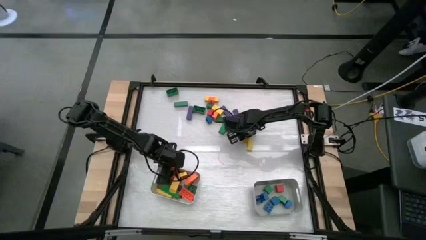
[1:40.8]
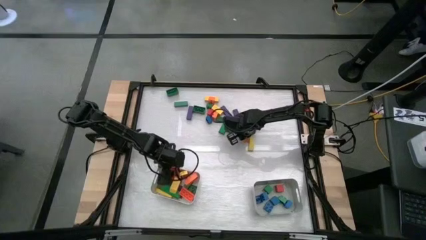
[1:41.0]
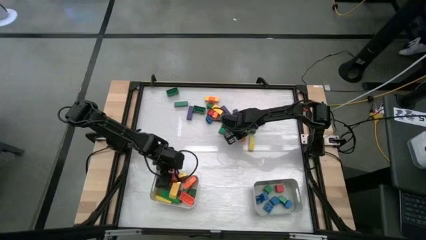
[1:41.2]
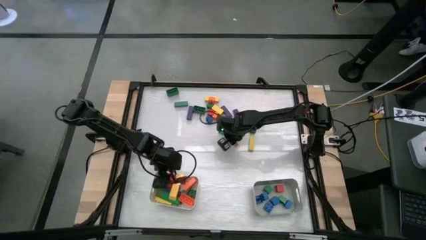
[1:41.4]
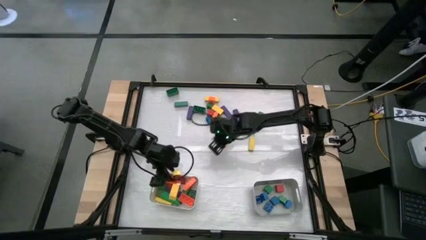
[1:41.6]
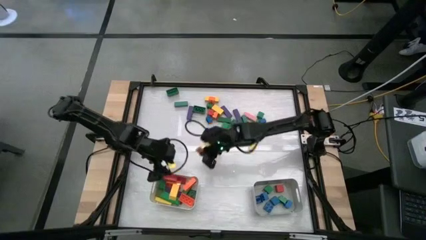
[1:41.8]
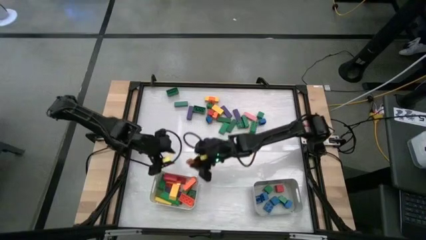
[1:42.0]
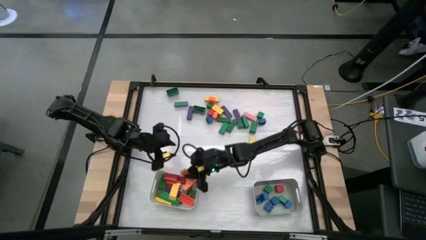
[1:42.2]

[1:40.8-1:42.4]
Task: Sort blocks by size
Put the rectangular orange block into the white bin

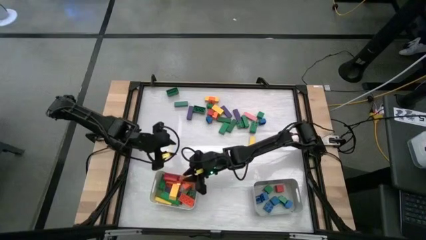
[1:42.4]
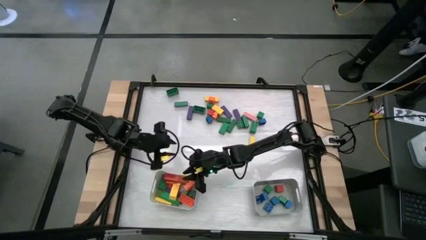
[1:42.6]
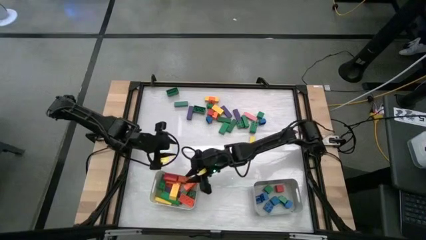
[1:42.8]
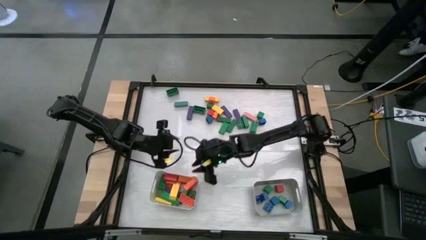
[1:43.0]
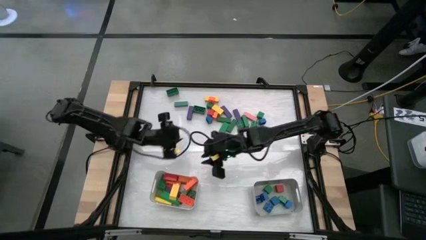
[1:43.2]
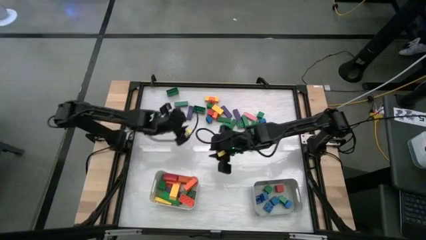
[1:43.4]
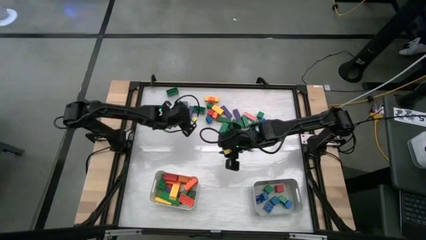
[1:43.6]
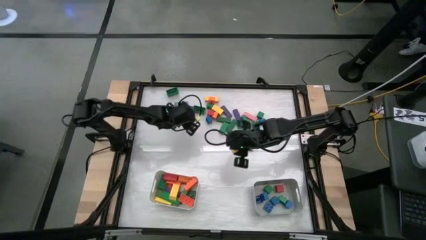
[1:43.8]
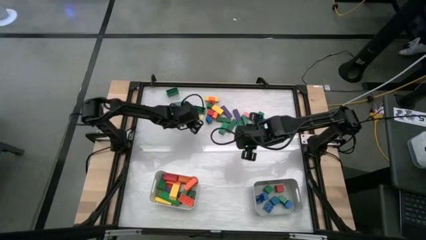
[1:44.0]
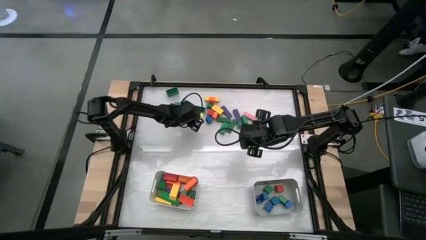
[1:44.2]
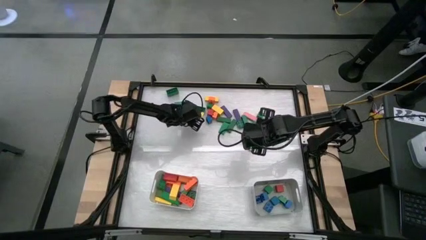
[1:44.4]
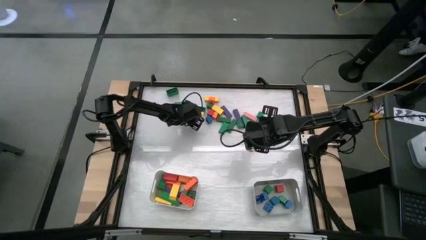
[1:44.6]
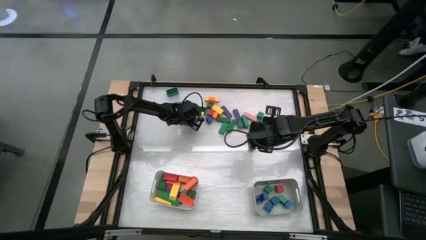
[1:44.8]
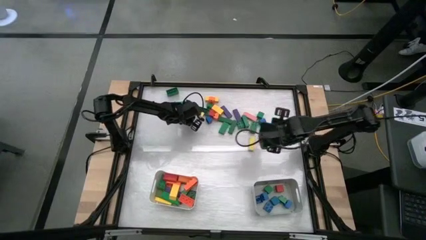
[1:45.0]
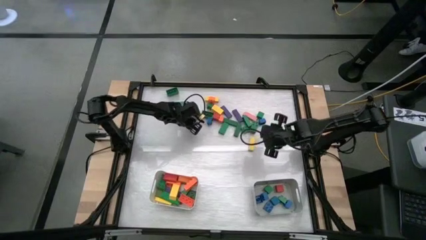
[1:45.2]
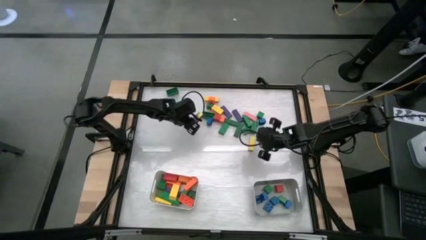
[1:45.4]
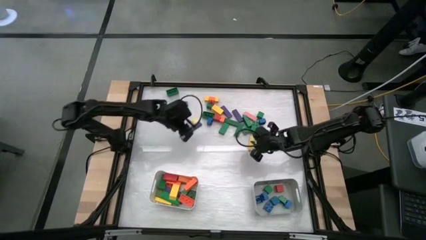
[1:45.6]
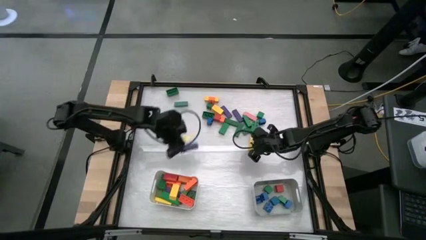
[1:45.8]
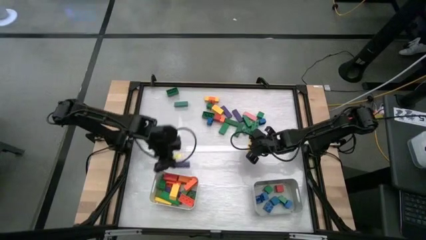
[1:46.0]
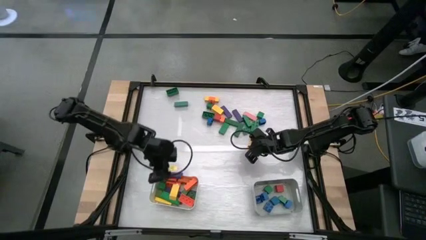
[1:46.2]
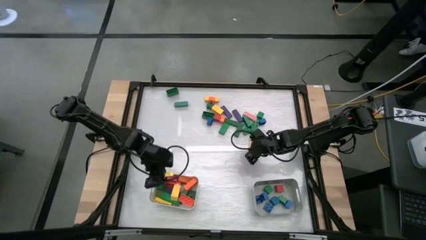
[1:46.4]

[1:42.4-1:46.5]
Put the rectangular violet block into the white bin

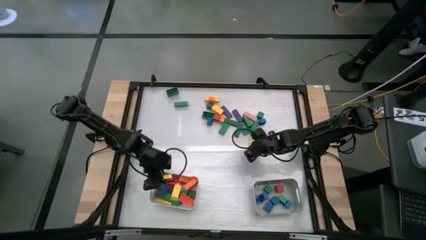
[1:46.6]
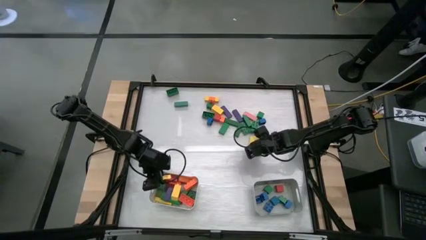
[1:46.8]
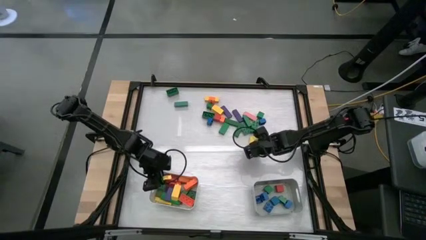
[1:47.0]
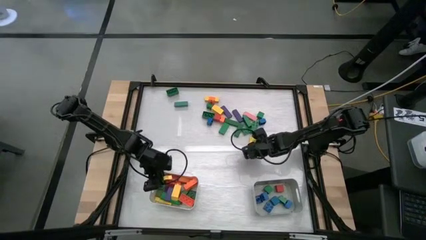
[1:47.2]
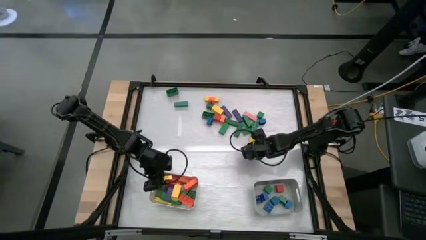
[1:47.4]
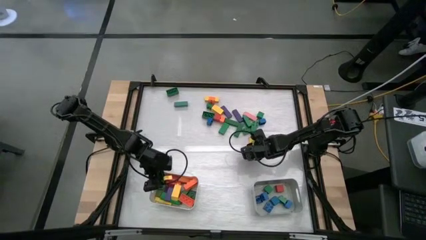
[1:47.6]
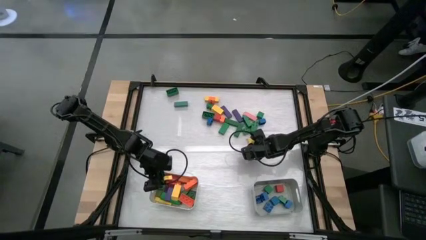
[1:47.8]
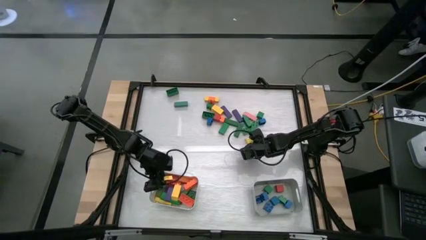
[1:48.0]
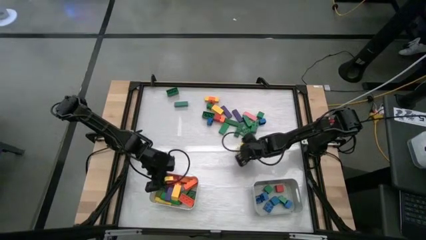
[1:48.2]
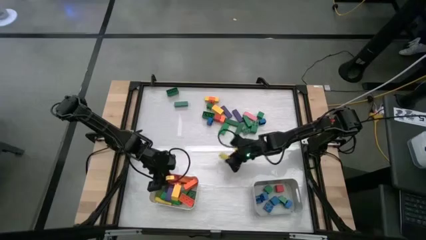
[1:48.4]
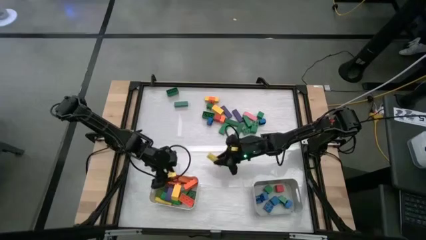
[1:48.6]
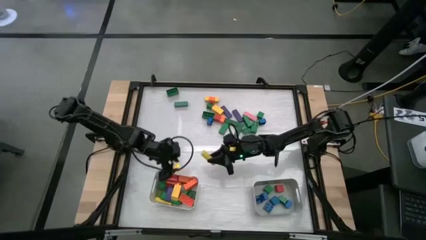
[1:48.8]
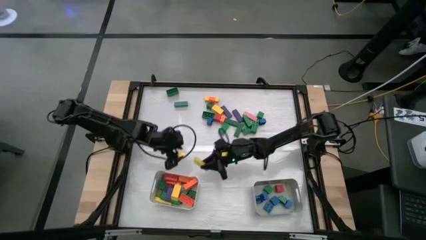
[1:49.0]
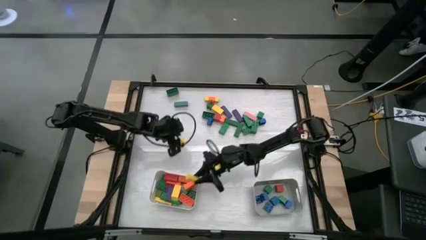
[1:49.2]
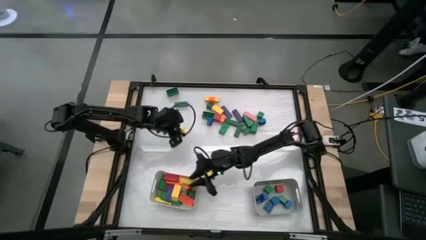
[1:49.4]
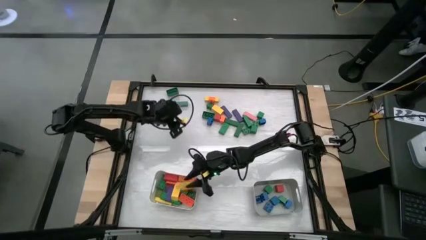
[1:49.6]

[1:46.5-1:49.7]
Put the rectangular yellow block into the white bin

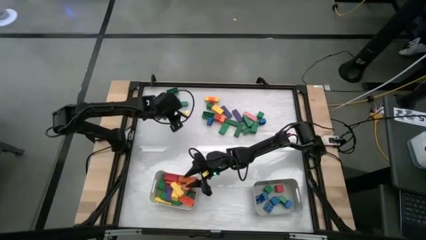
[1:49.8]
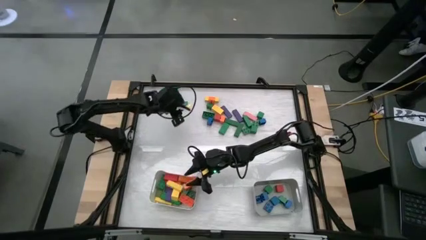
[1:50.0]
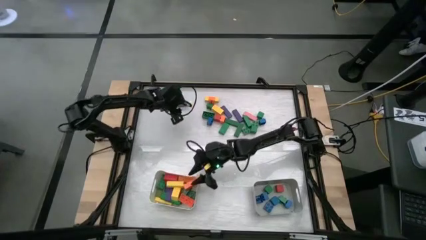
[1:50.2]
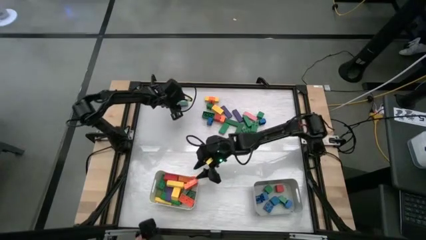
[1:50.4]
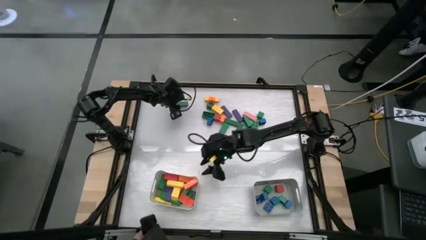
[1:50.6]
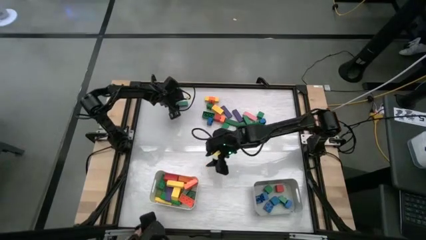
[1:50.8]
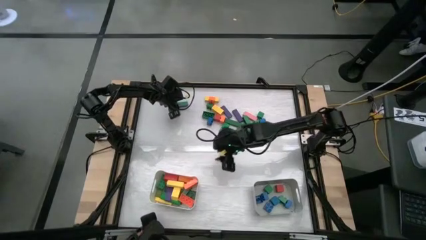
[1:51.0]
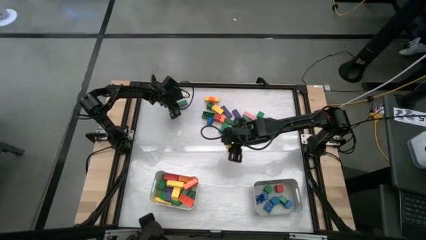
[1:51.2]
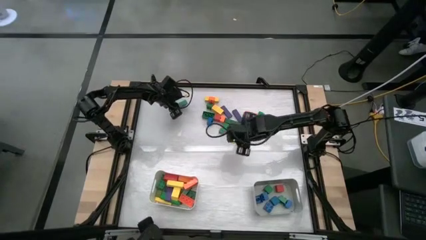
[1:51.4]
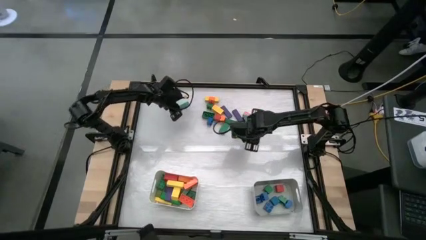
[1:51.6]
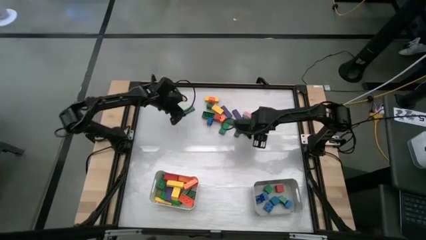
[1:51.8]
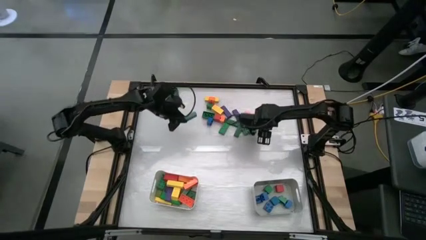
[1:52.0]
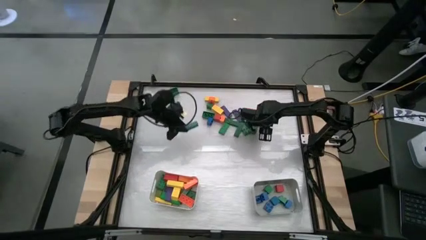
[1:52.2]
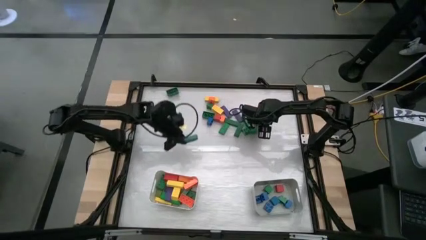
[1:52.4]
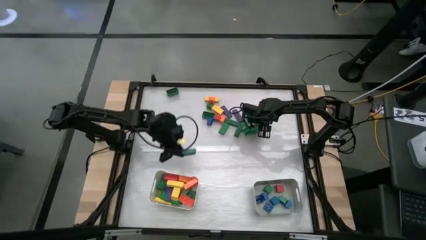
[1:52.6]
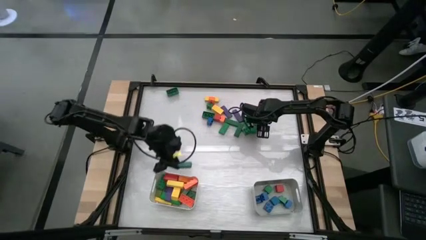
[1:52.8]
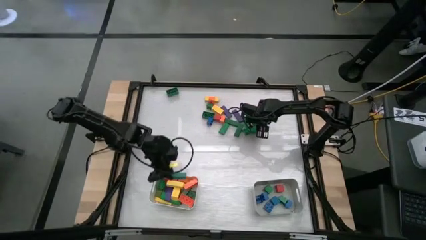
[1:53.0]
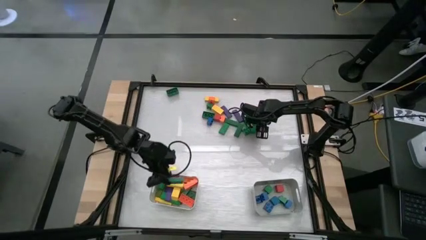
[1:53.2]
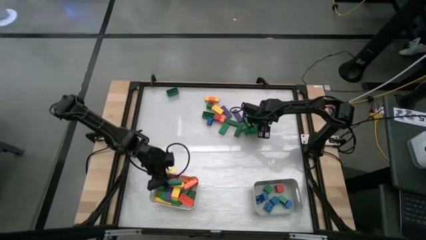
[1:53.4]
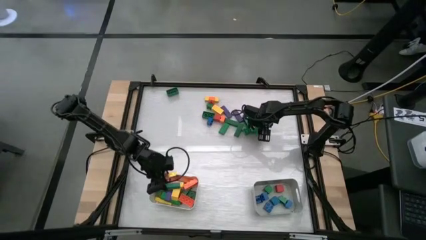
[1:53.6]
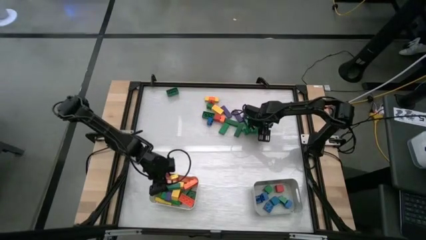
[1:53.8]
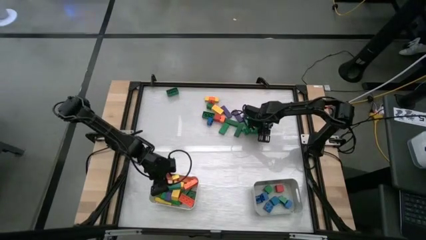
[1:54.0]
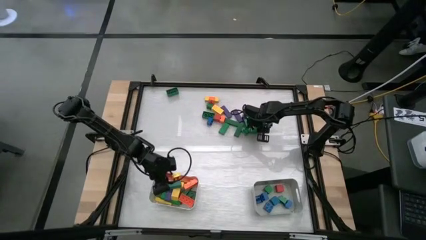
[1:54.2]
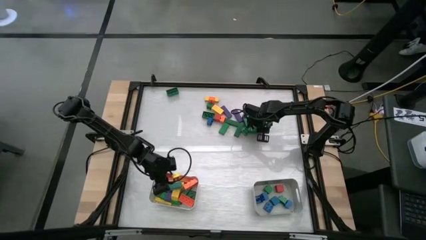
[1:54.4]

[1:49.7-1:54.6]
Put the rectangular green block into the white bin

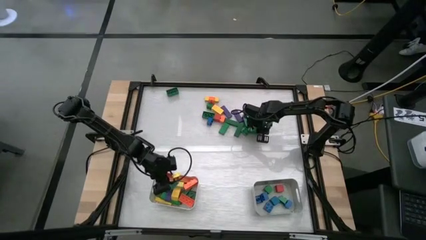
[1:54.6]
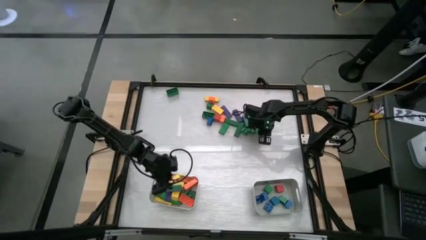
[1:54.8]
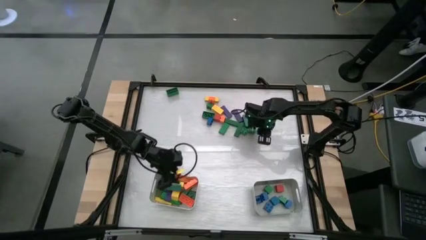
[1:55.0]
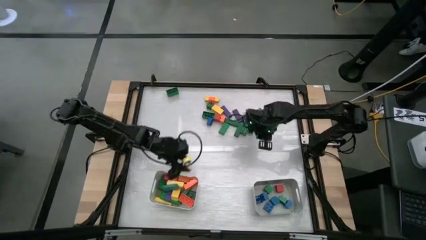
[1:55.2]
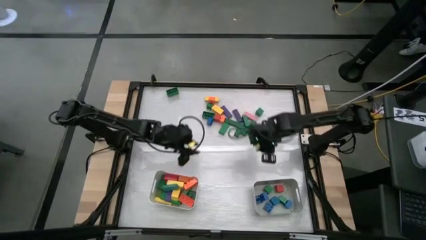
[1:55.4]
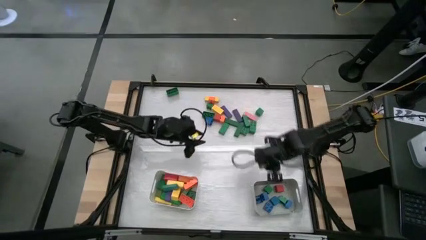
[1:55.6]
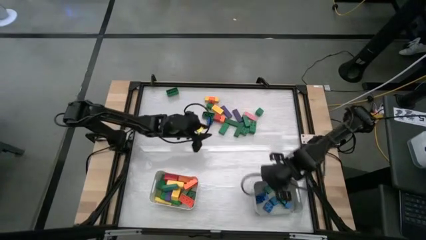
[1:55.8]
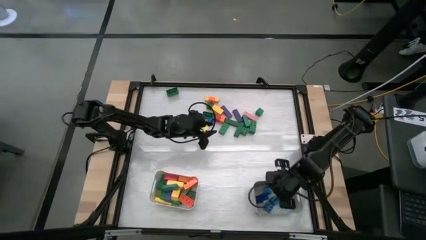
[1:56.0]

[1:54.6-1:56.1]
Put the square blue game piece into the gray bin
